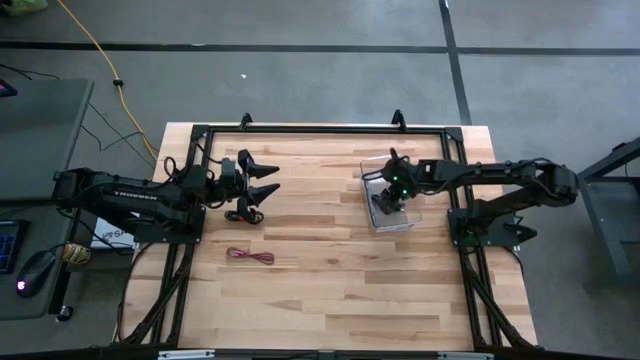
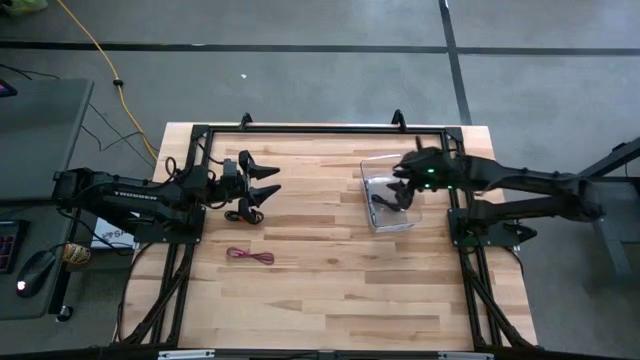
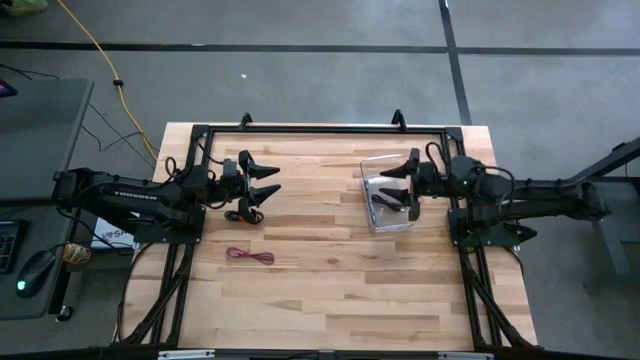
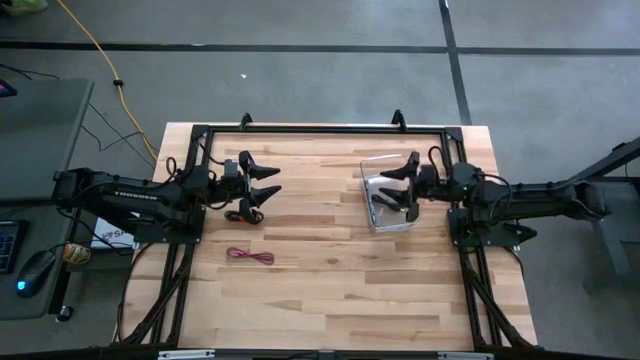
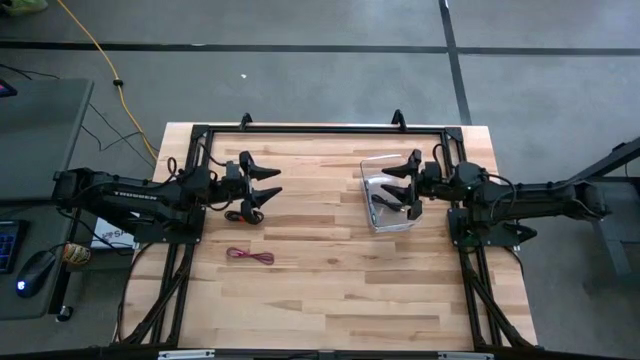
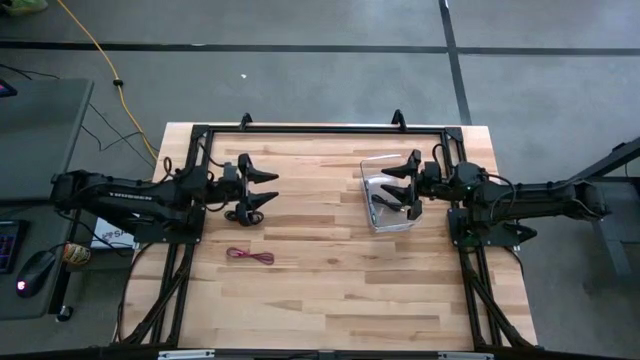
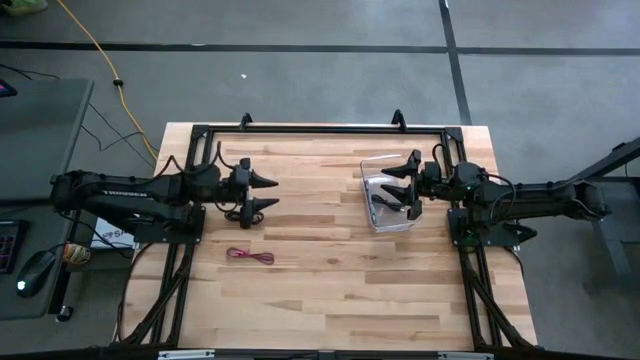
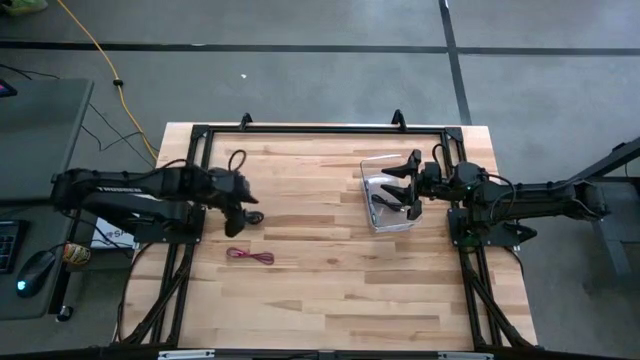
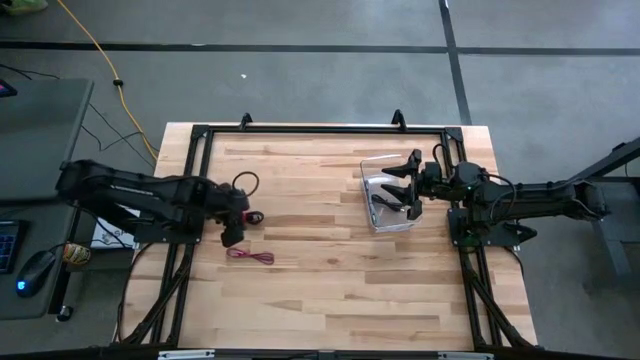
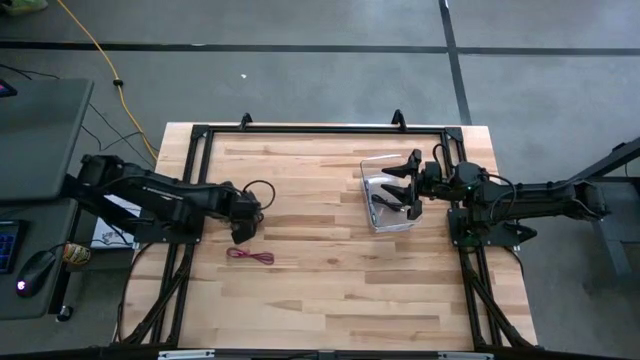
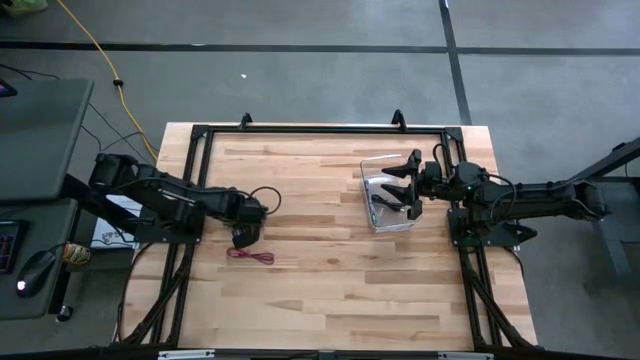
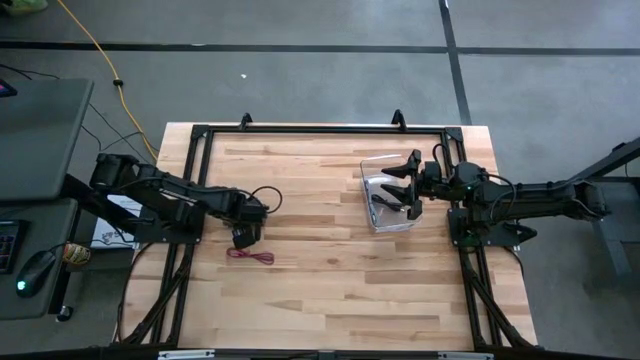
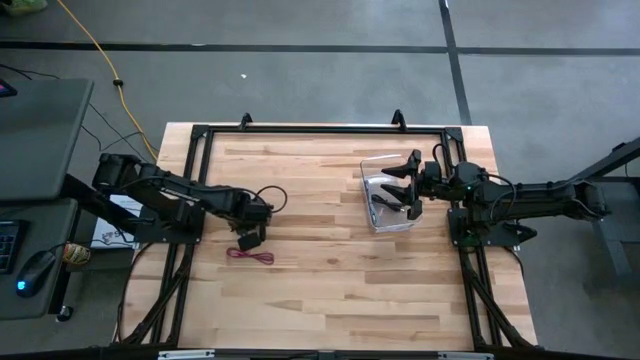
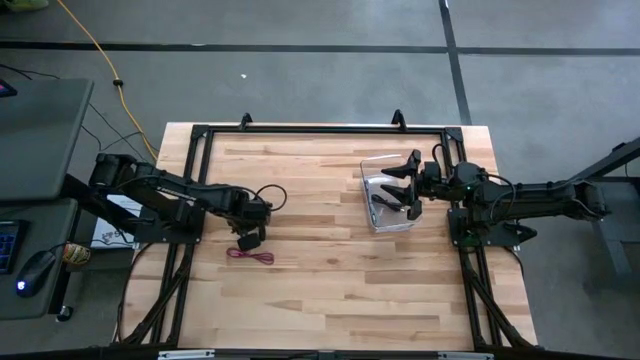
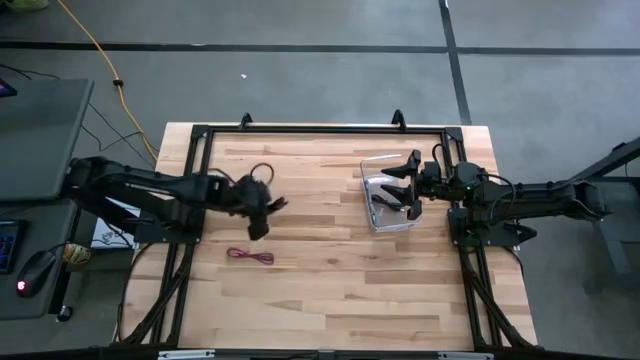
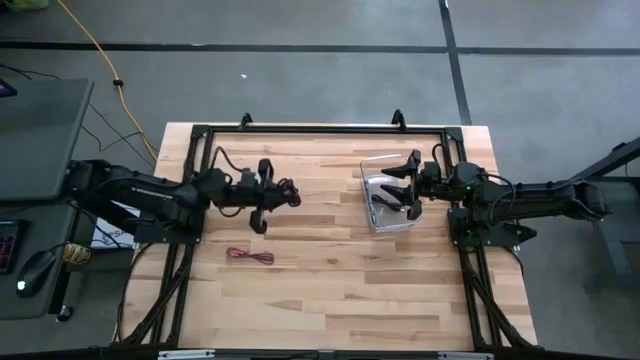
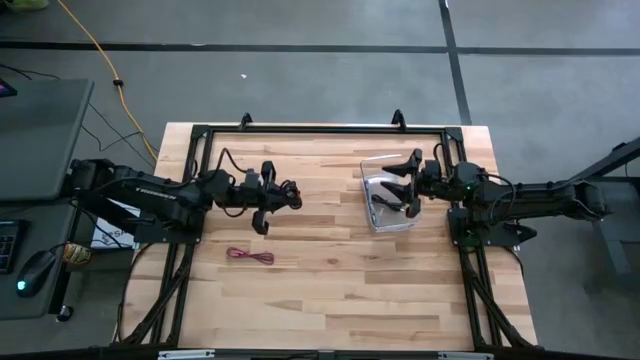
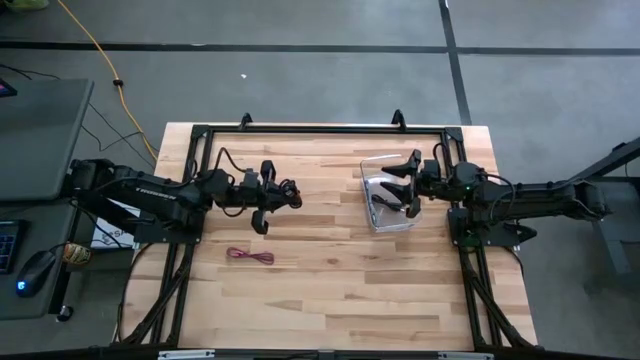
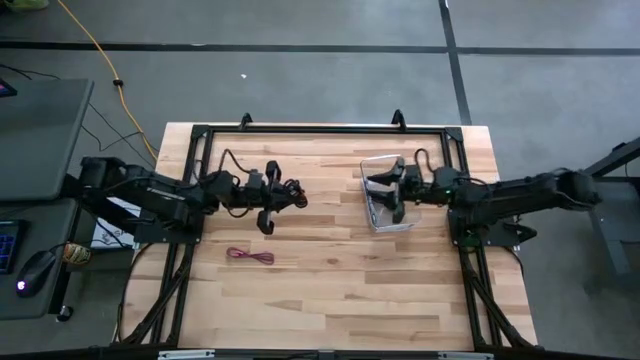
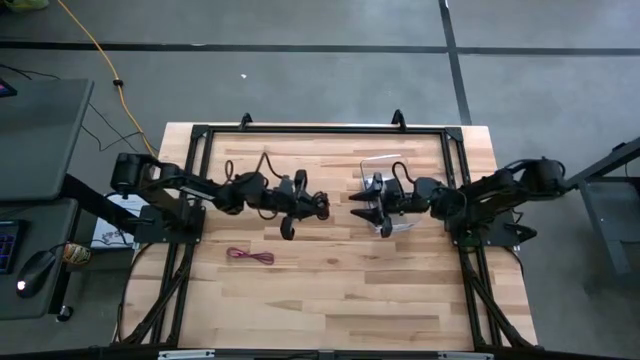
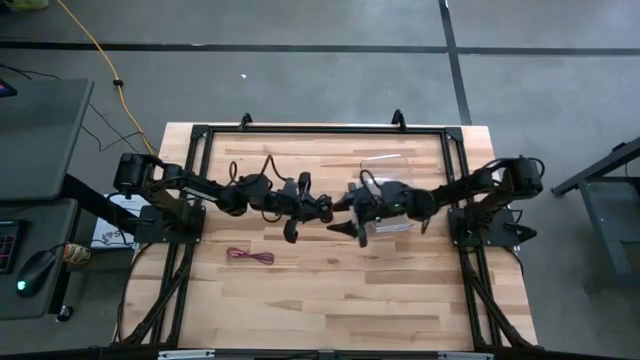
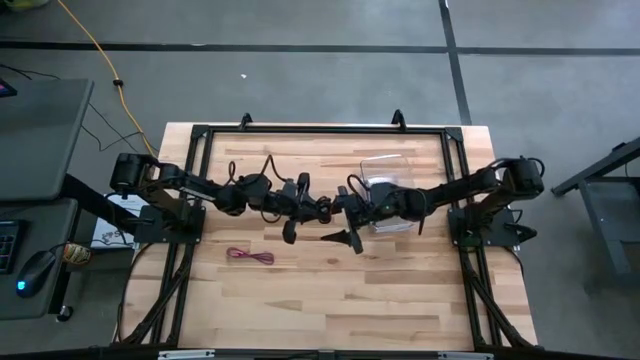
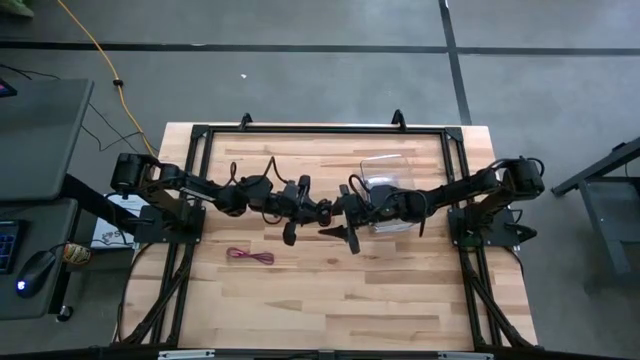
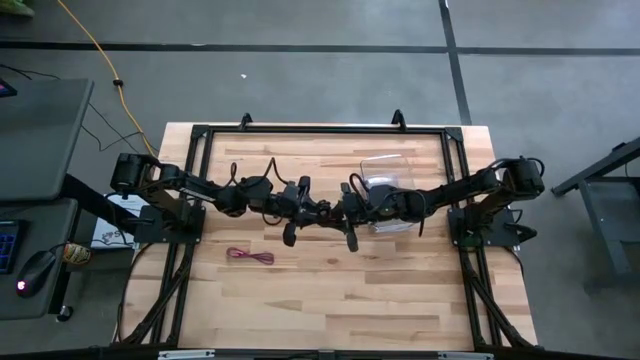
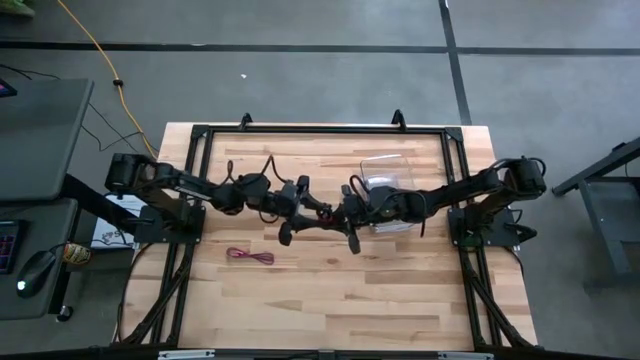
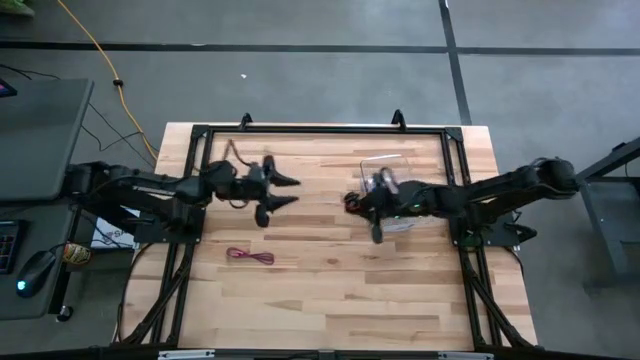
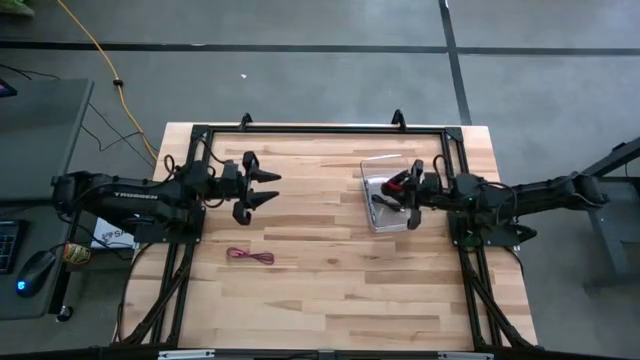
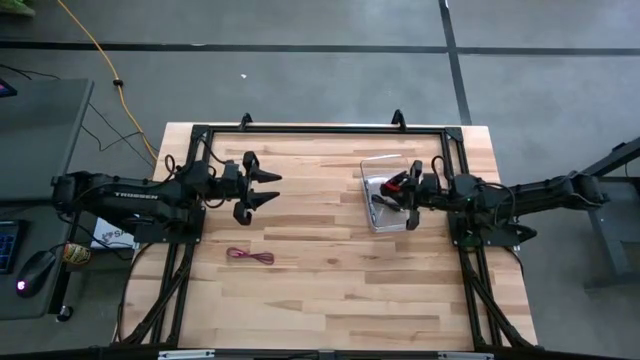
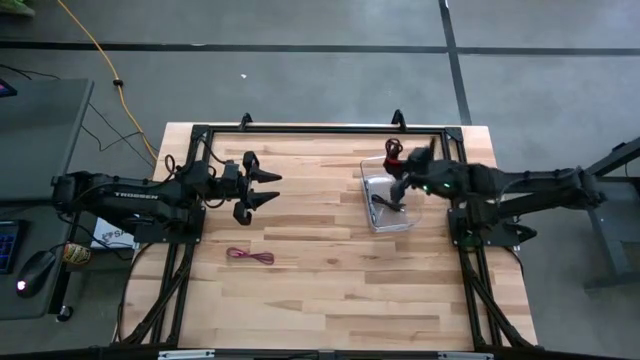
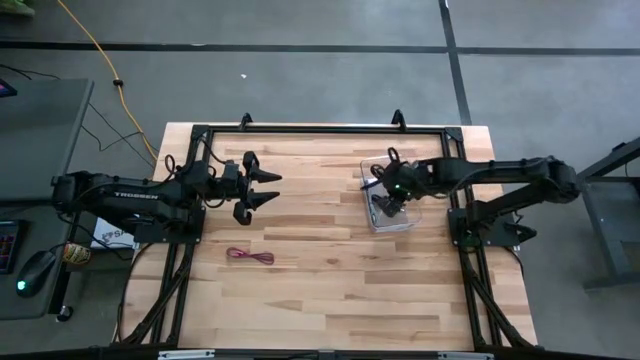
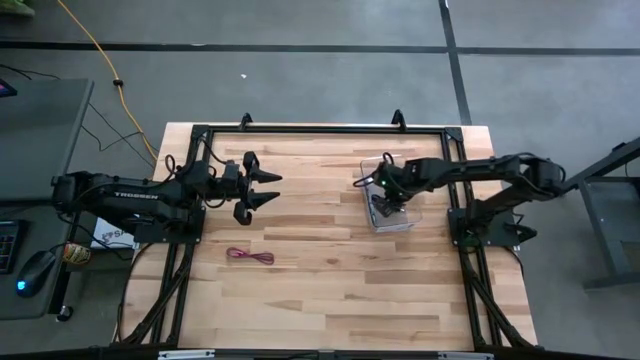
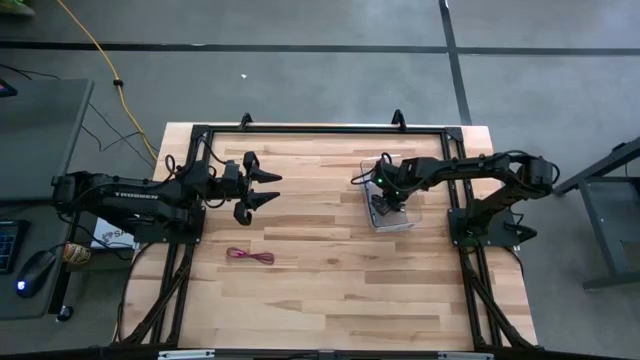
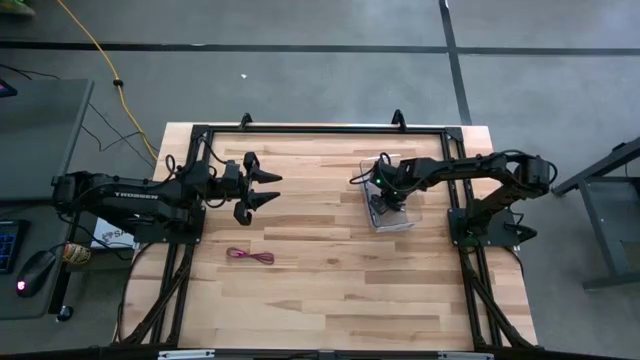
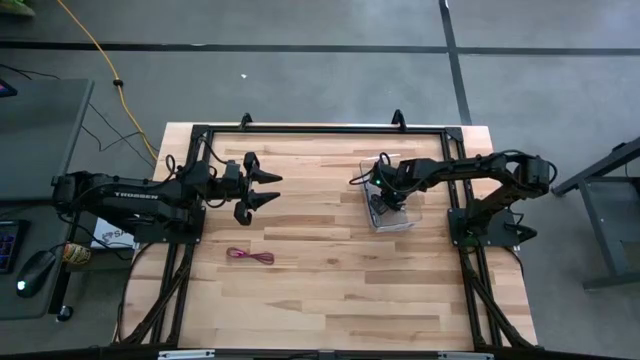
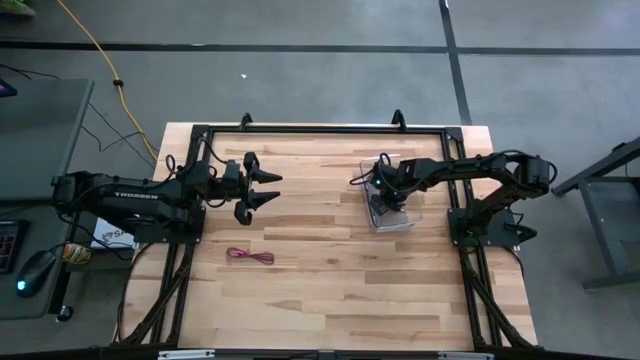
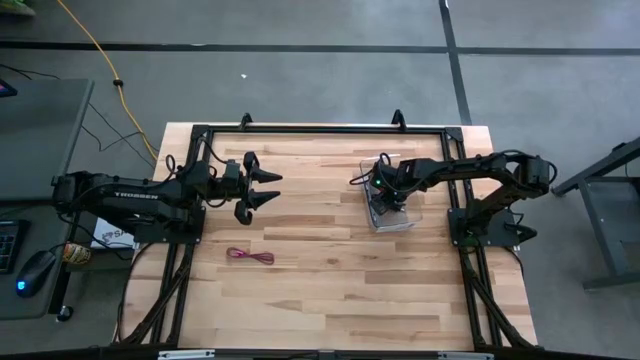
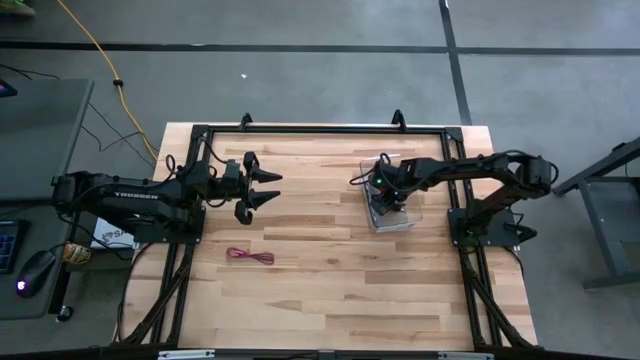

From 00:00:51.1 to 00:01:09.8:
Task: Pick and place USB-C Cables
Put the orange cable charger into the transparent bin

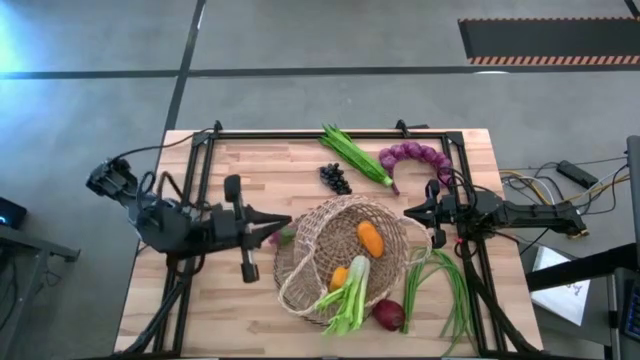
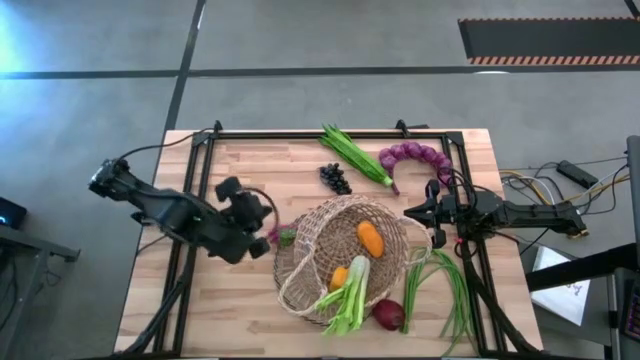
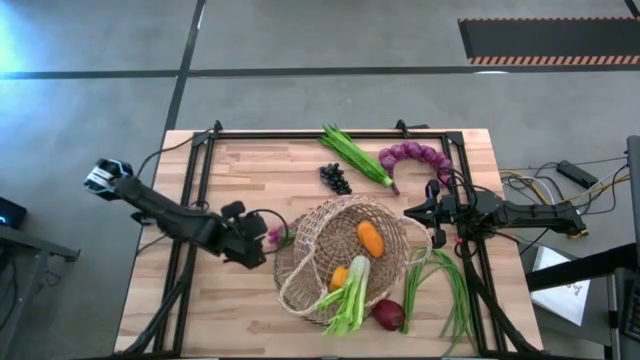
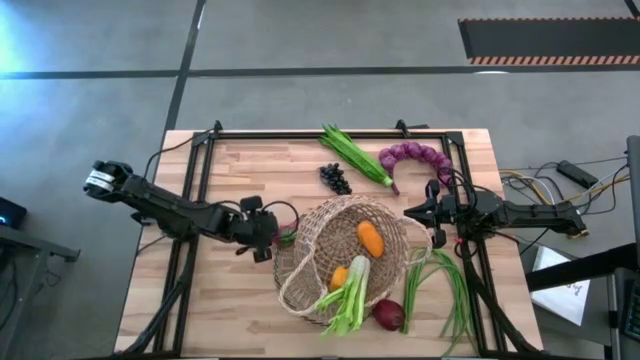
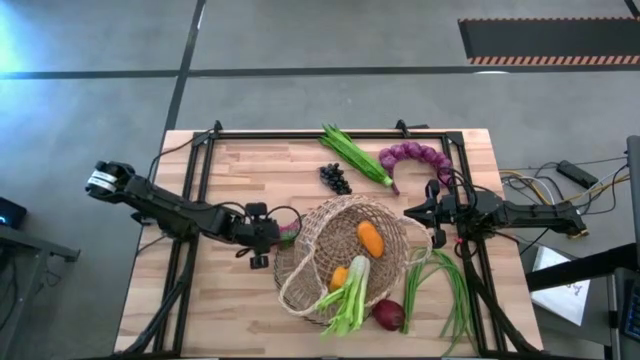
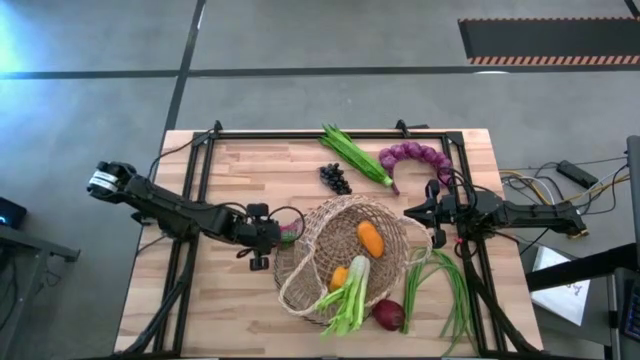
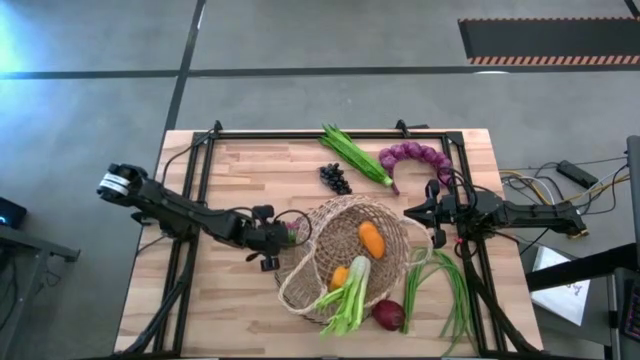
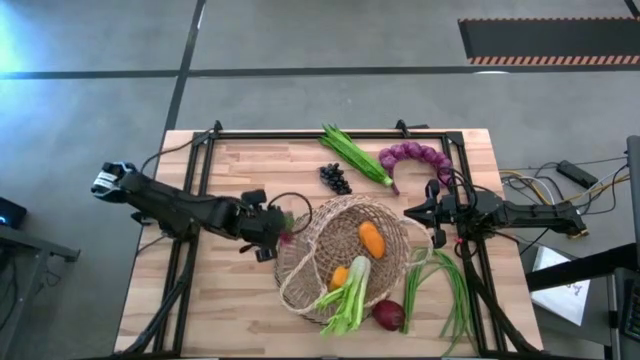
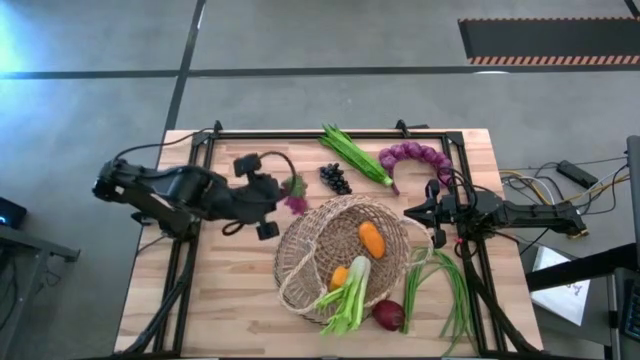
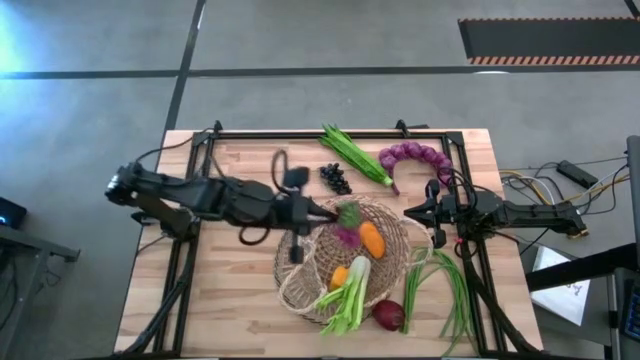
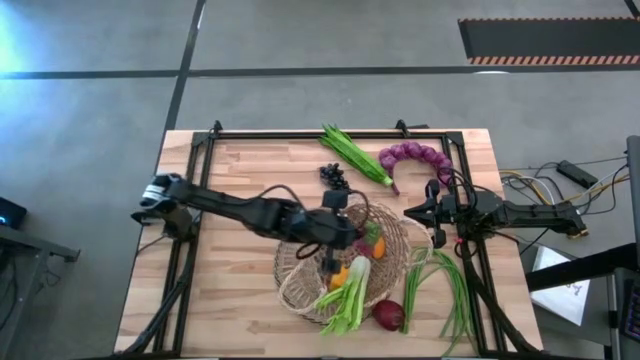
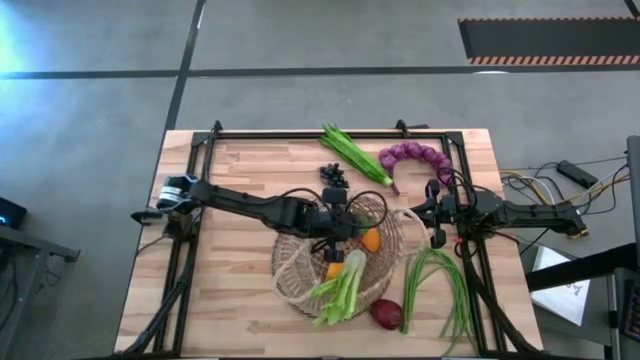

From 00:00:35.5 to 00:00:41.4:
Task: Build produce basket
Put the red grapes into the basket
